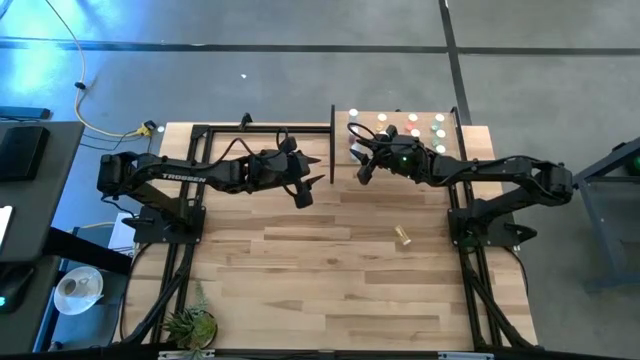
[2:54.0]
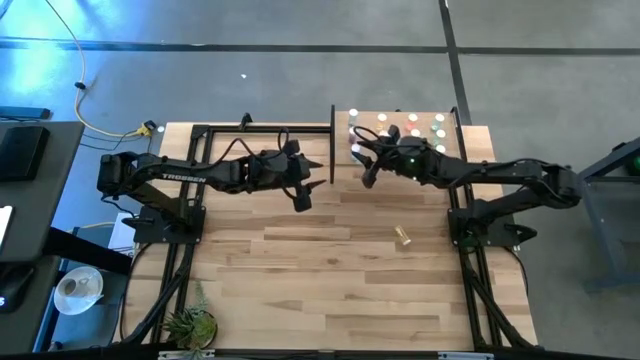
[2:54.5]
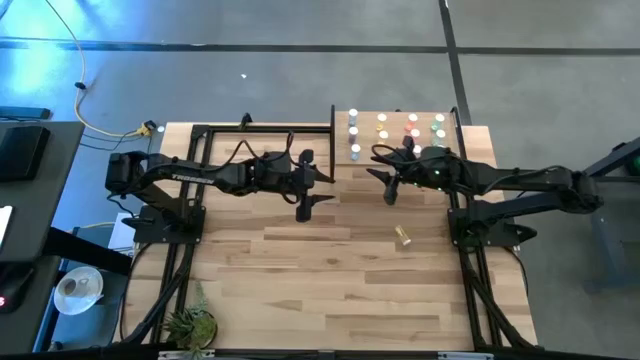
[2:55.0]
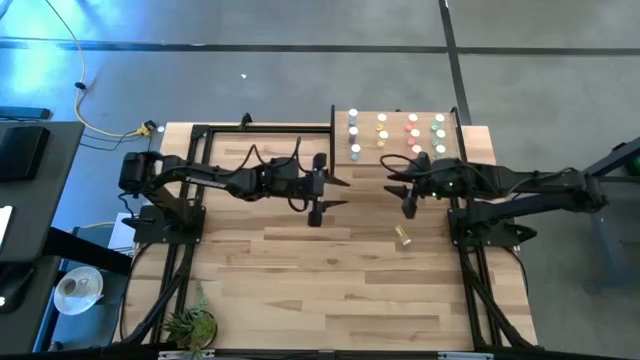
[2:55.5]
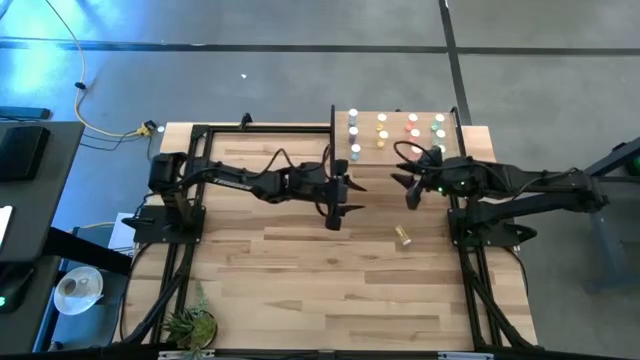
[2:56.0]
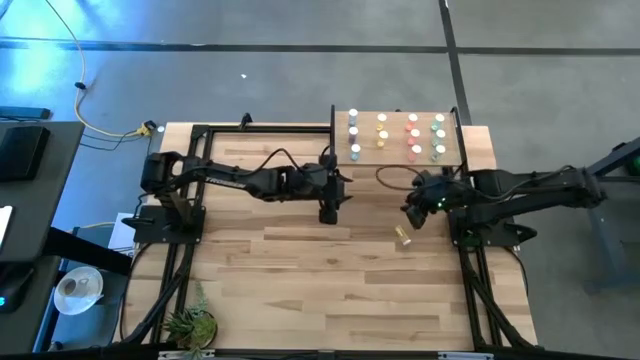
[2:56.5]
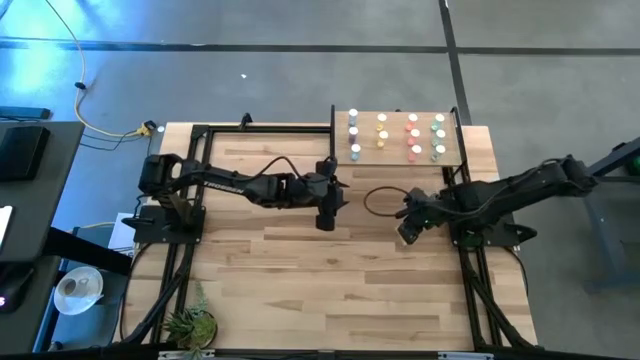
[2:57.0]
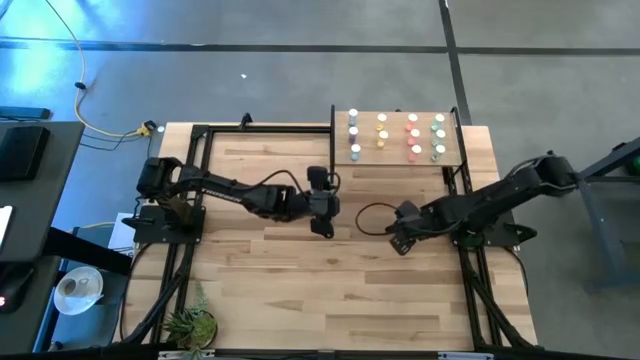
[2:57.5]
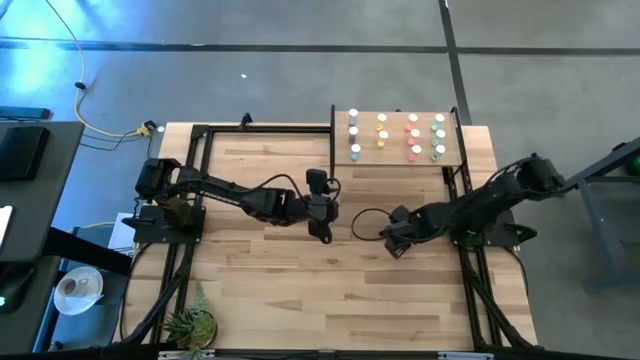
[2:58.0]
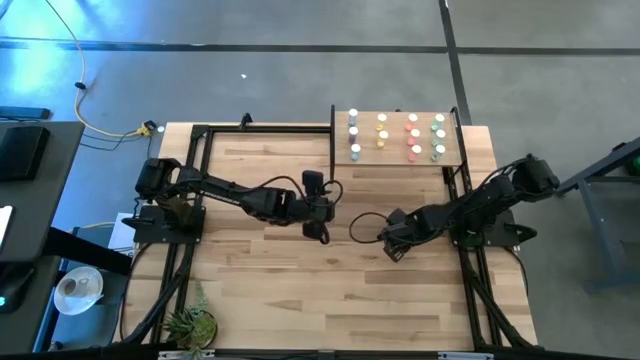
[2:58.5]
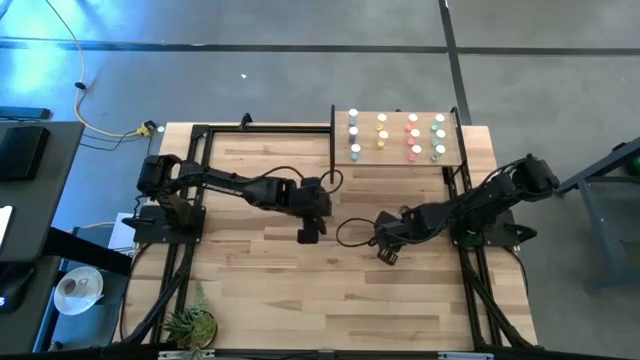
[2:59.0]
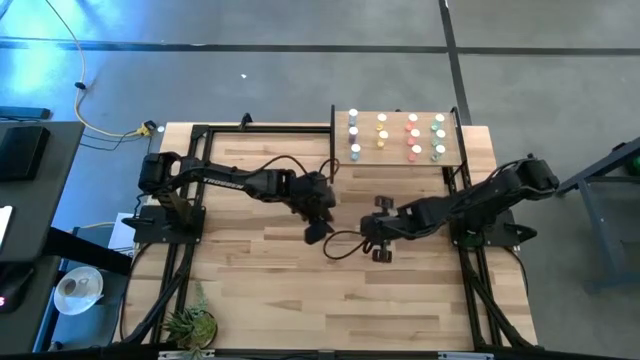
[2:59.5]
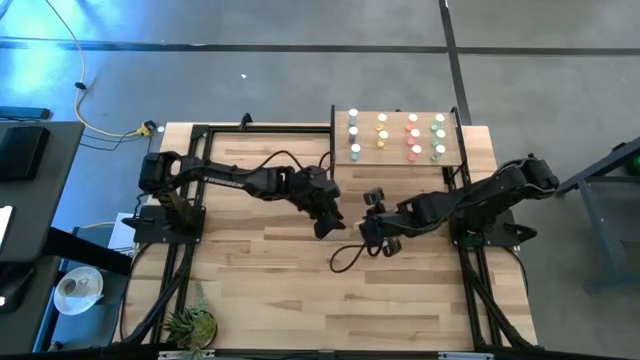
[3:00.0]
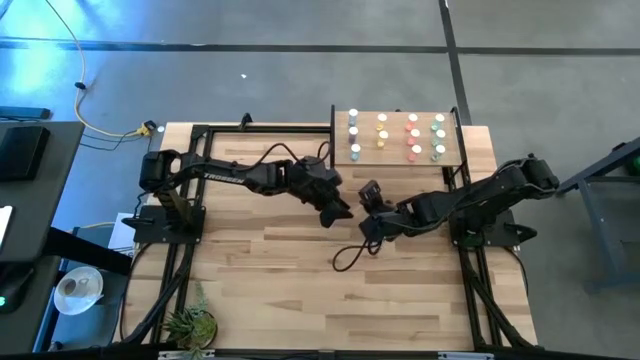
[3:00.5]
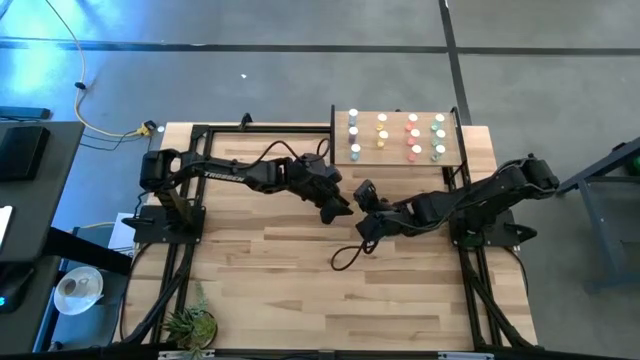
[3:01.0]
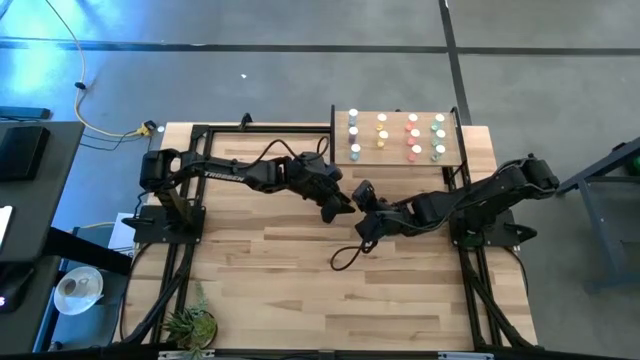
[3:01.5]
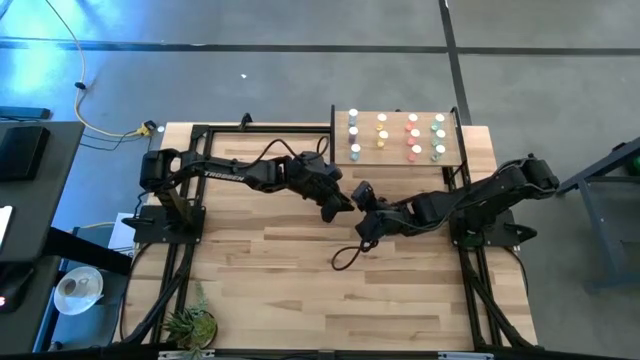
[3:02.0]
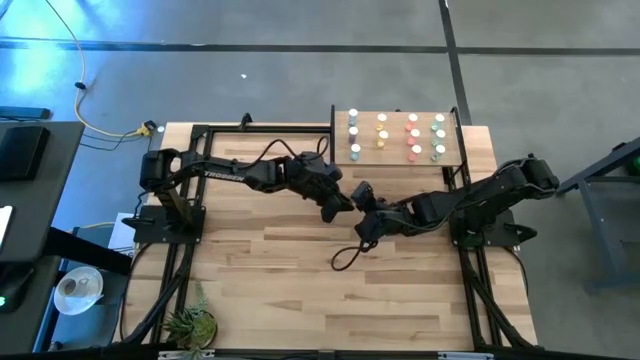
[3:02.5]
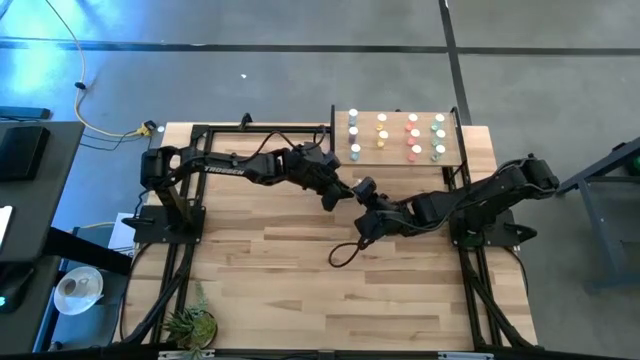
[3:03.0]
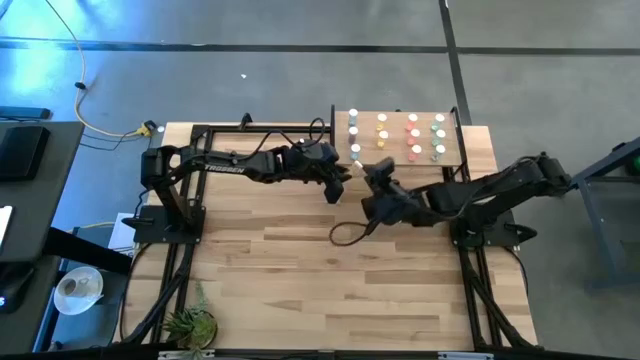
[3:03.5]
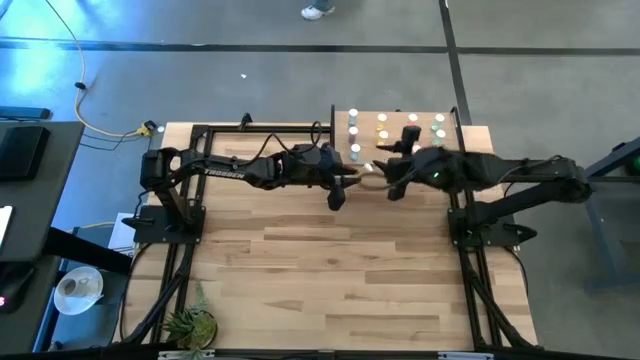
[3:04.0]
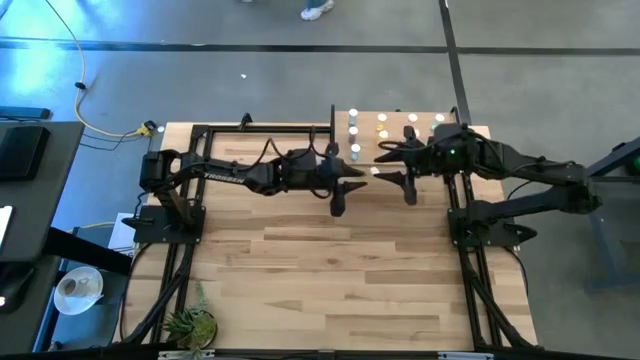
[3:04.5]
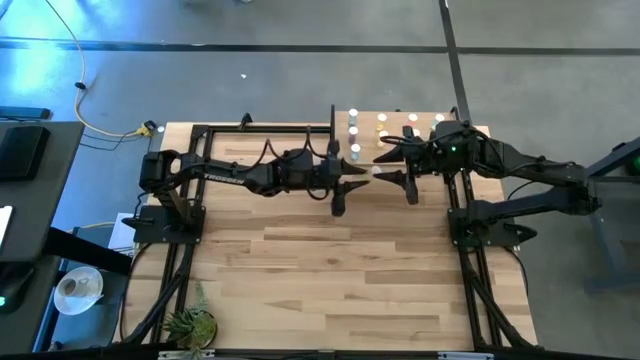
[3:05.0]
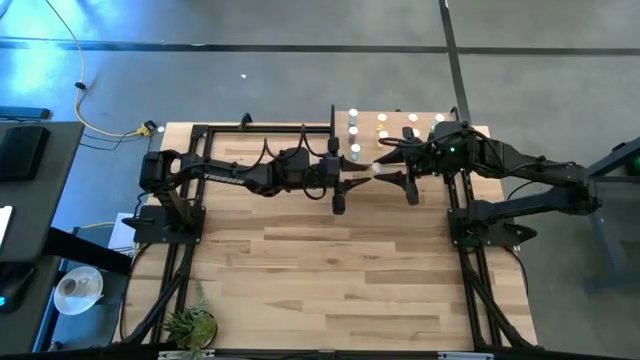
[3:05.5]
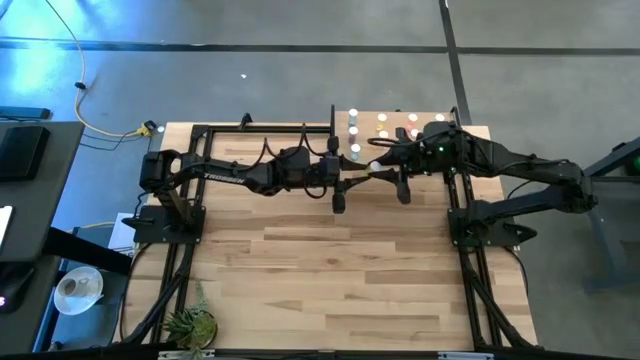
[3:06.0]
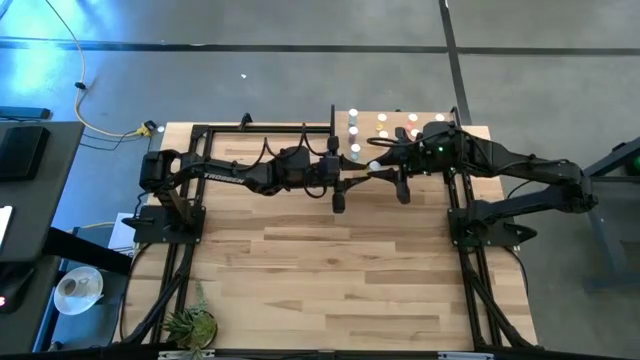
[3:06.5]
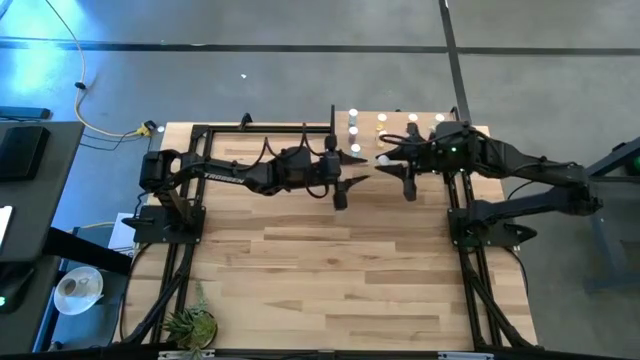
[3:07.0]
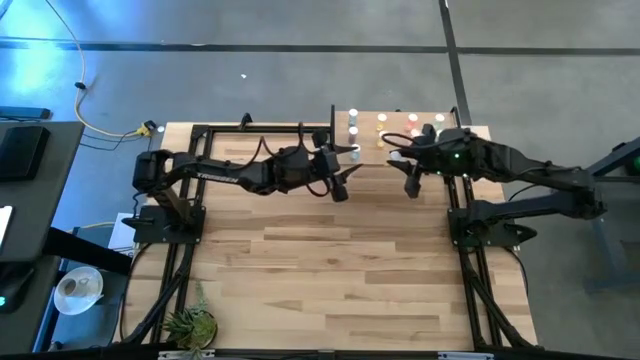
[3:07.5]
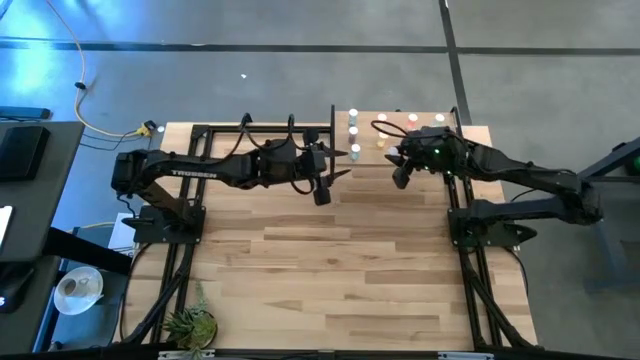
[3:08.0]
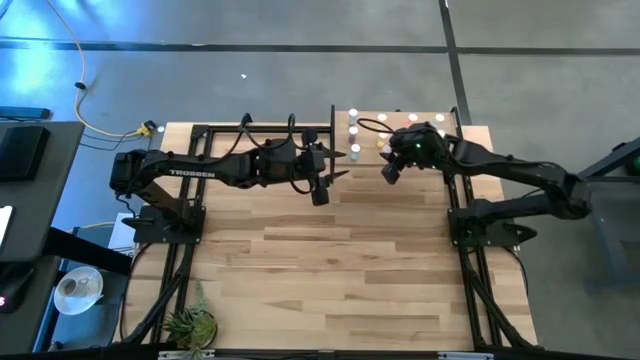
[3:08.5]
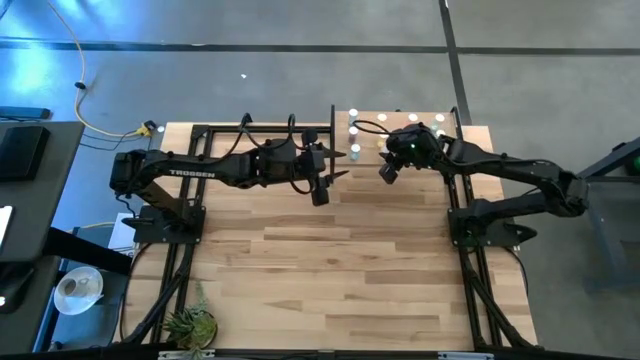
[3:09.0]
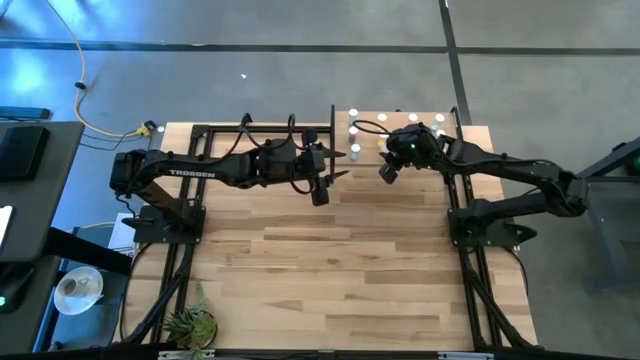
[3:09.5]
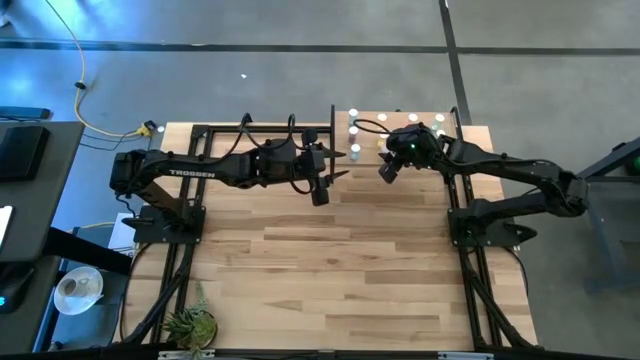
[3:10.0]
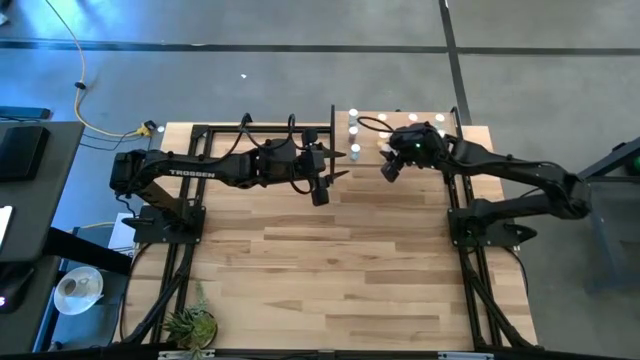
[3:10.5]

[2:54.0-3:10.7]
Task: Pick and place medicine bottles onto shelf by color
Put the yellow medicine bottle aligned with the other yellow medicine bottle on the shelf

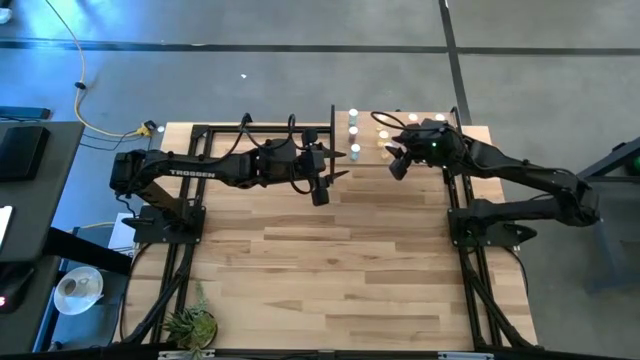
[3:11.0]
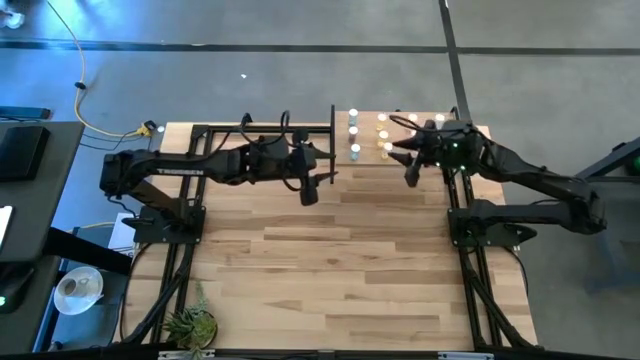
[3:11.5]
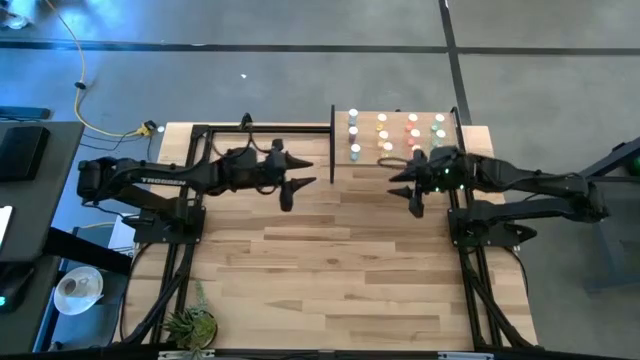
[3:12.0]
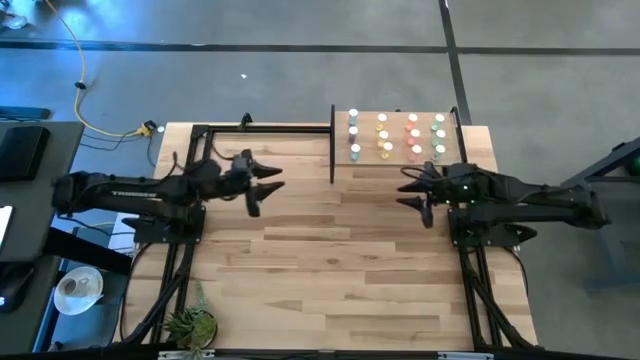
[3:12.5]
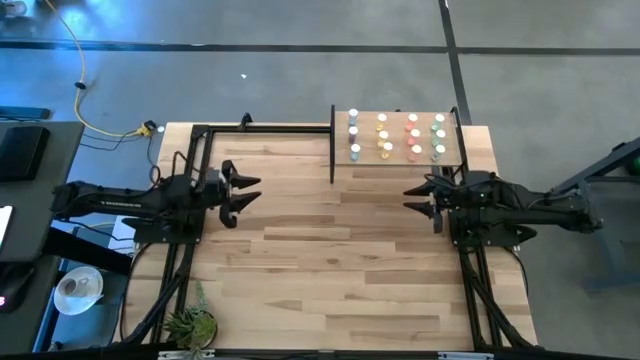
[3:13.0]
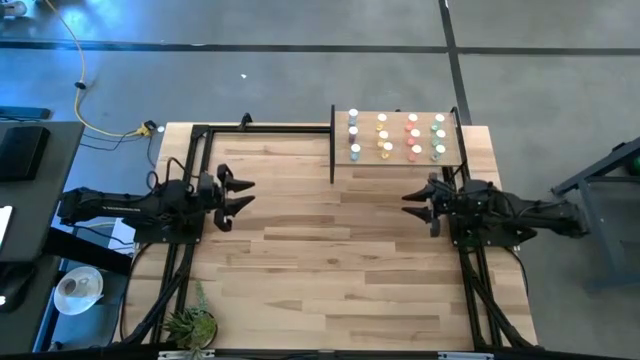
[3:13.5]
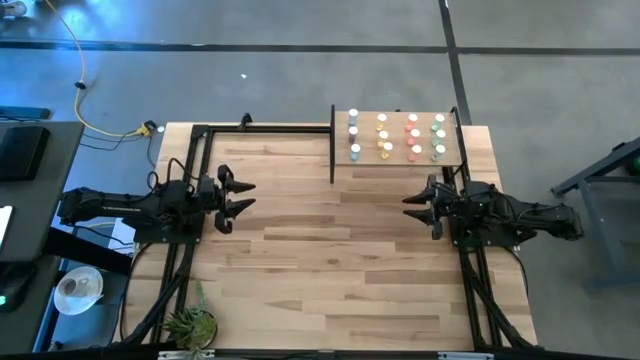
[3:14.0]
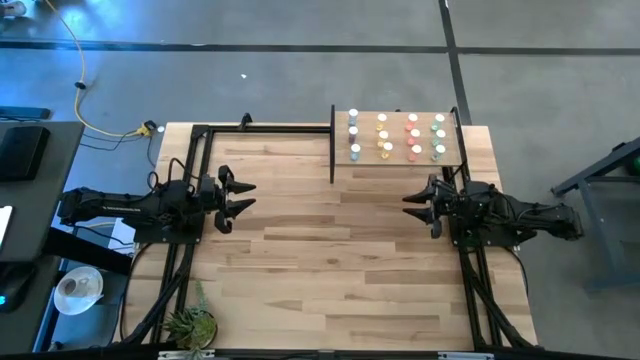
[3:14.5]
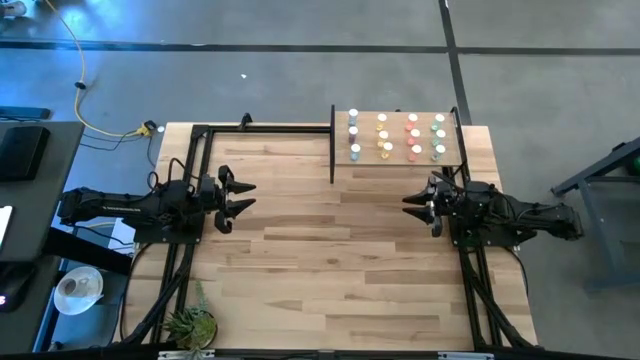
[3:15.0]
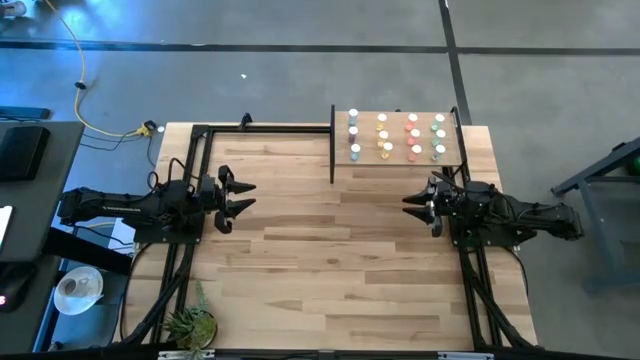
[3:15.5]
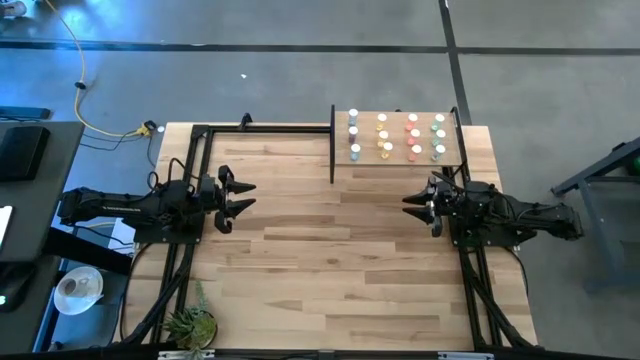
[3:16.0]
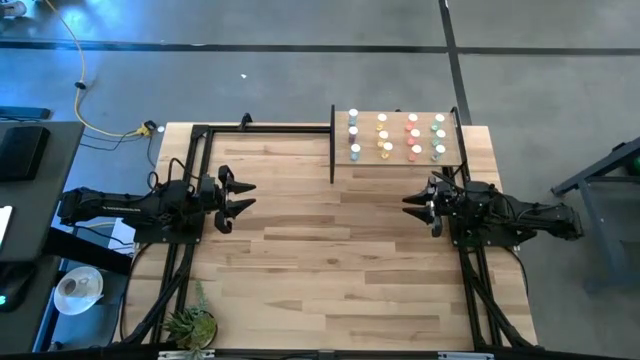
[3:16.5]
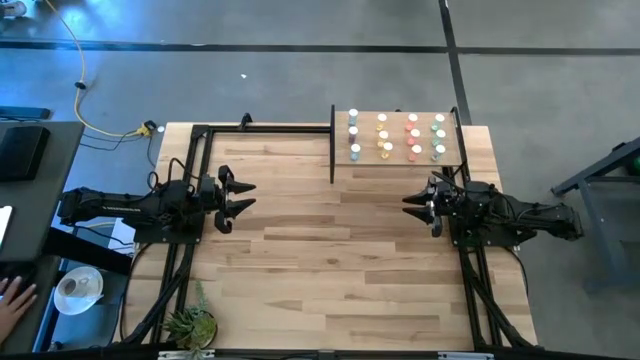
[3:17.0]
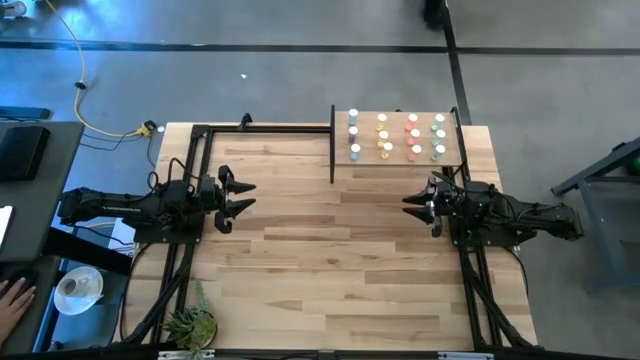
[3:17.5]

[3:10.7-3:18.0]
Return to home position
